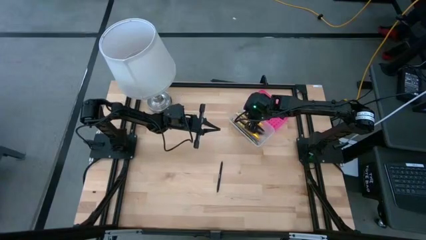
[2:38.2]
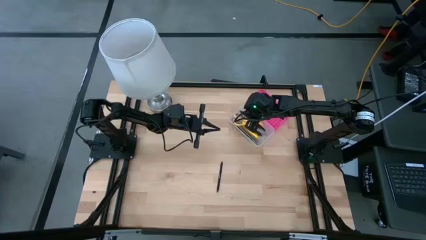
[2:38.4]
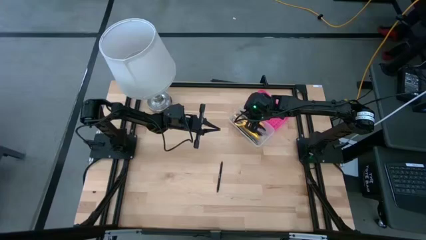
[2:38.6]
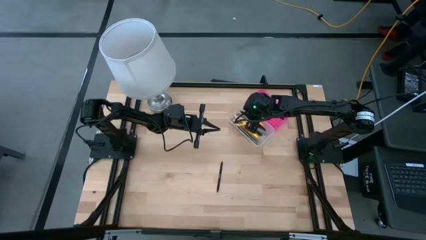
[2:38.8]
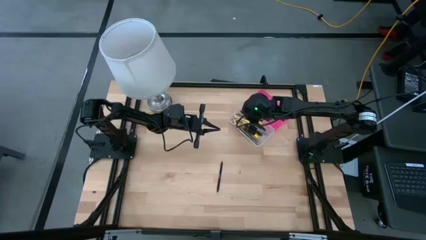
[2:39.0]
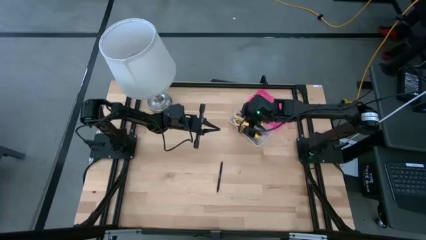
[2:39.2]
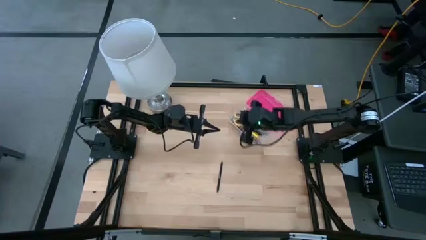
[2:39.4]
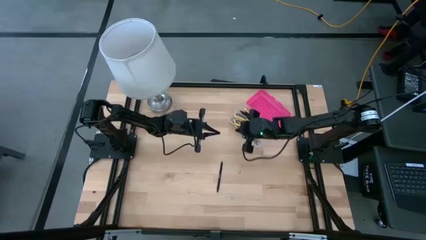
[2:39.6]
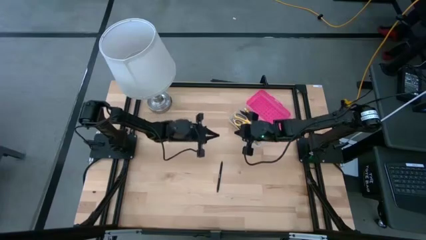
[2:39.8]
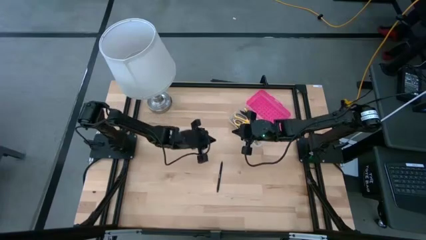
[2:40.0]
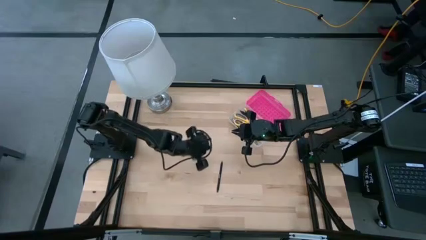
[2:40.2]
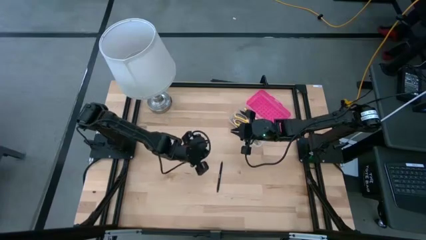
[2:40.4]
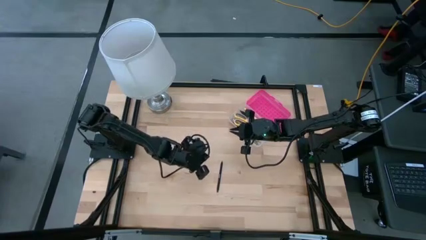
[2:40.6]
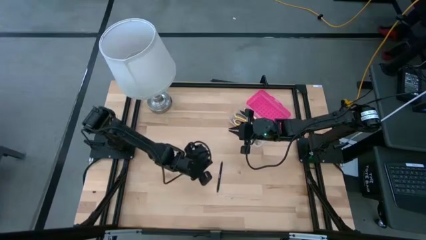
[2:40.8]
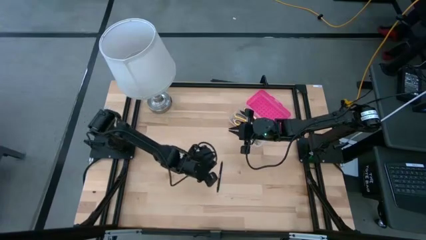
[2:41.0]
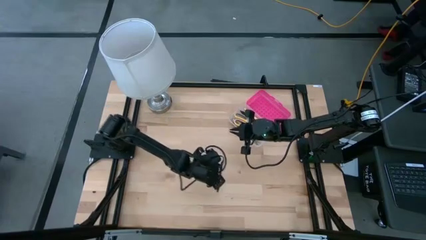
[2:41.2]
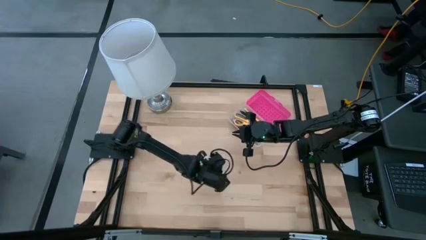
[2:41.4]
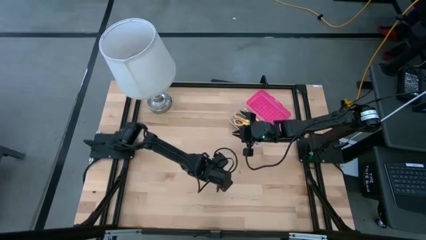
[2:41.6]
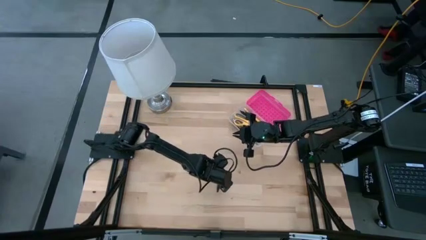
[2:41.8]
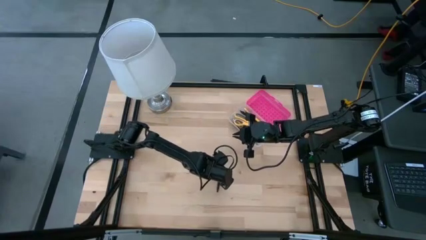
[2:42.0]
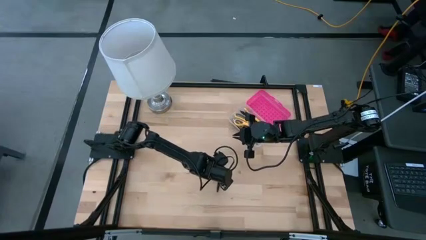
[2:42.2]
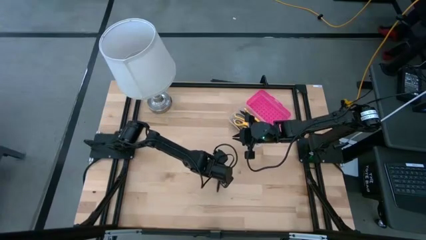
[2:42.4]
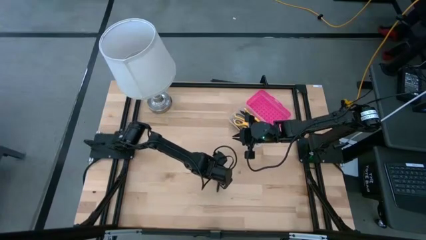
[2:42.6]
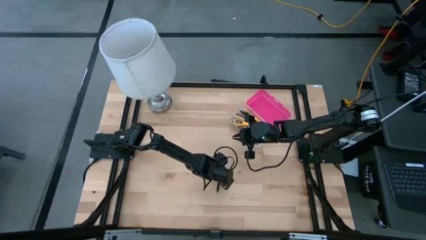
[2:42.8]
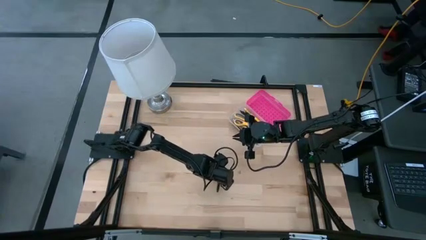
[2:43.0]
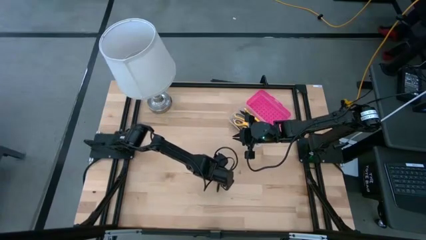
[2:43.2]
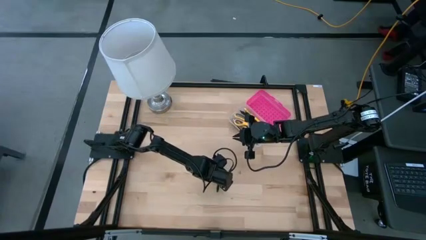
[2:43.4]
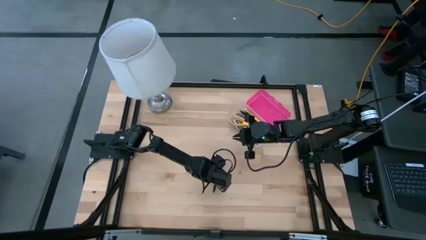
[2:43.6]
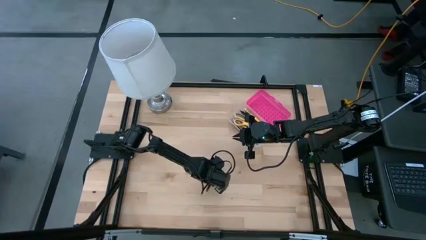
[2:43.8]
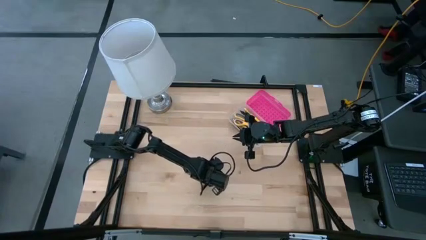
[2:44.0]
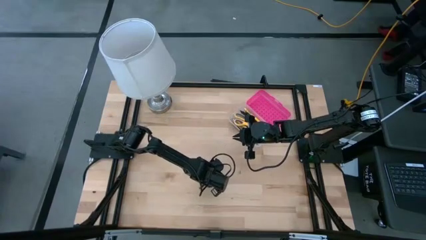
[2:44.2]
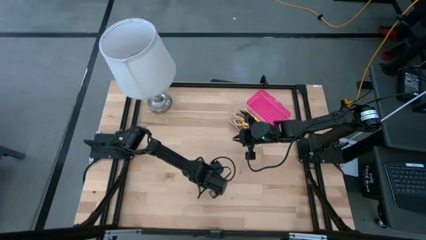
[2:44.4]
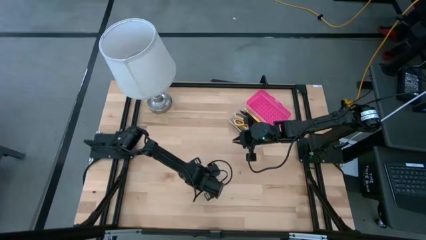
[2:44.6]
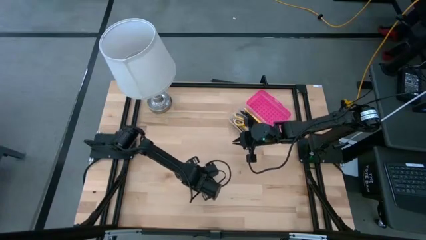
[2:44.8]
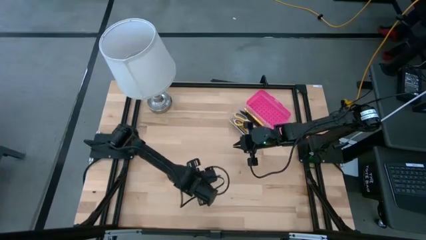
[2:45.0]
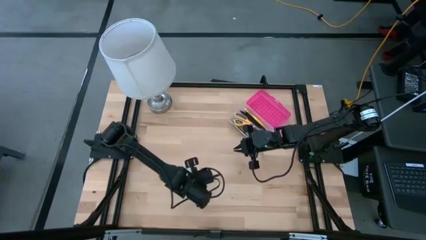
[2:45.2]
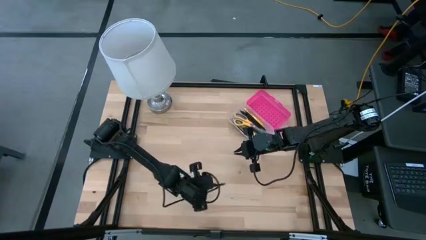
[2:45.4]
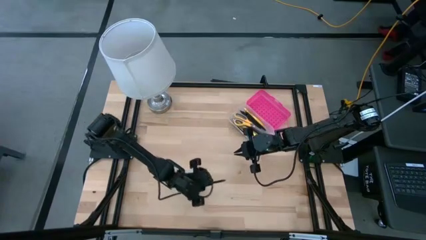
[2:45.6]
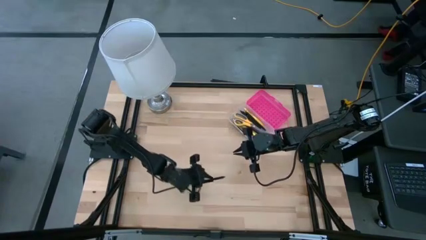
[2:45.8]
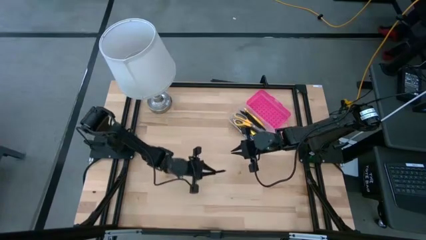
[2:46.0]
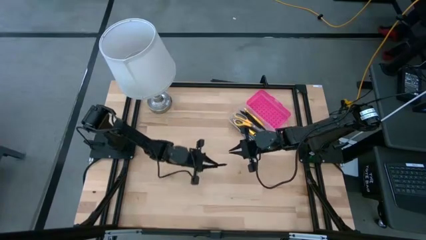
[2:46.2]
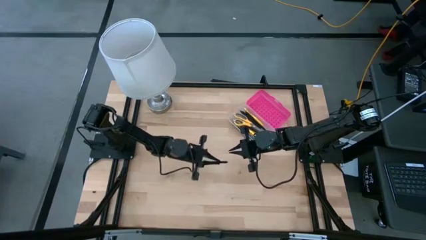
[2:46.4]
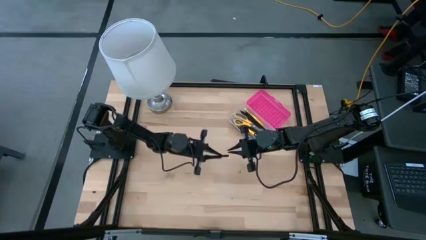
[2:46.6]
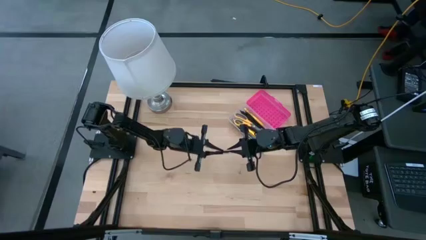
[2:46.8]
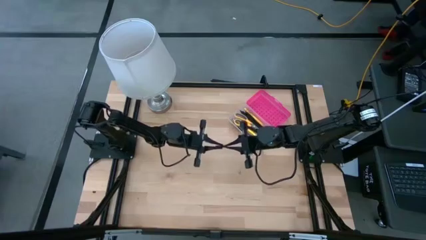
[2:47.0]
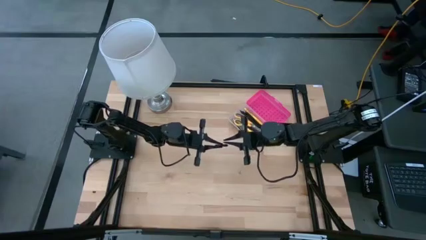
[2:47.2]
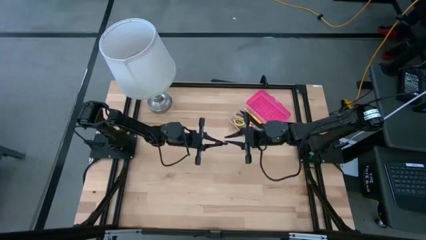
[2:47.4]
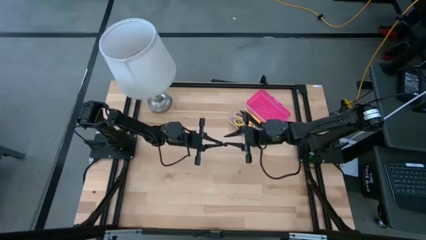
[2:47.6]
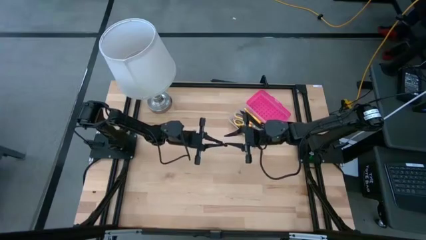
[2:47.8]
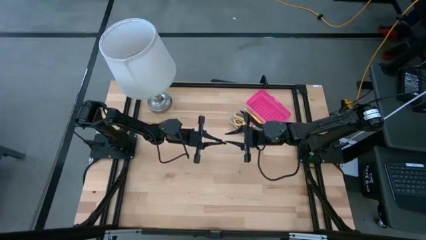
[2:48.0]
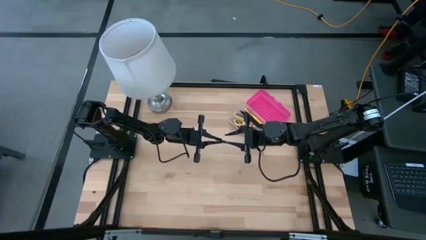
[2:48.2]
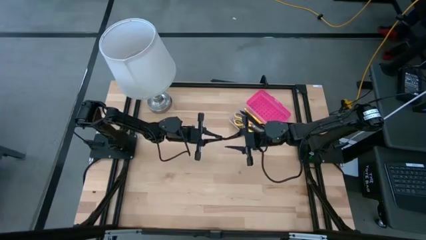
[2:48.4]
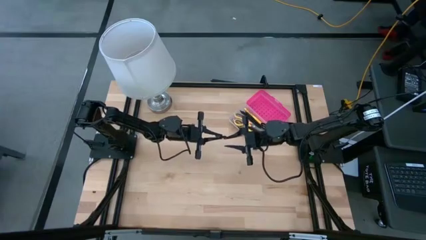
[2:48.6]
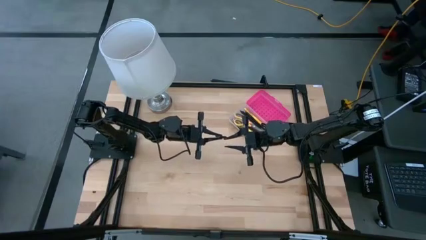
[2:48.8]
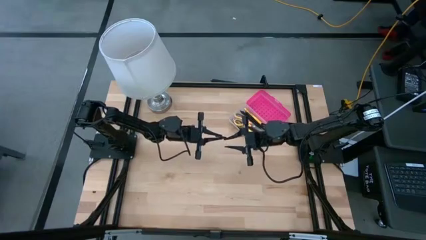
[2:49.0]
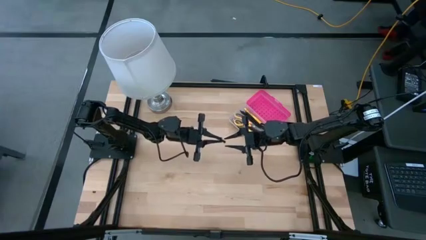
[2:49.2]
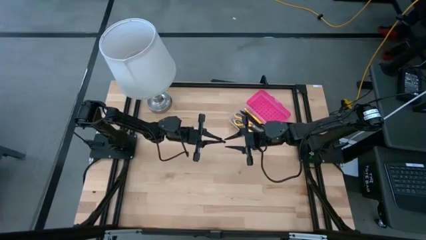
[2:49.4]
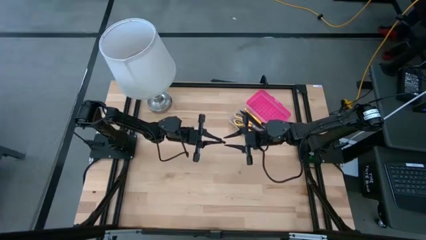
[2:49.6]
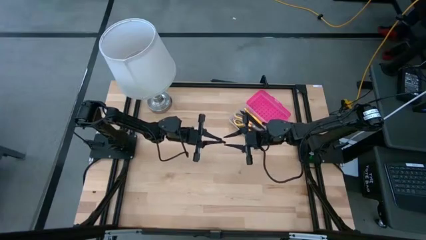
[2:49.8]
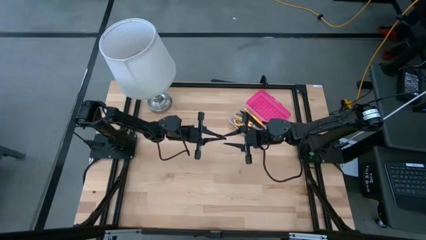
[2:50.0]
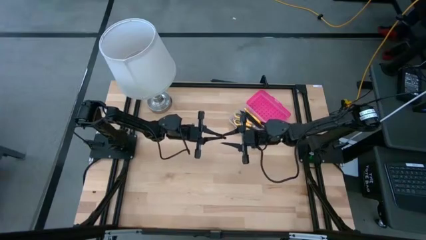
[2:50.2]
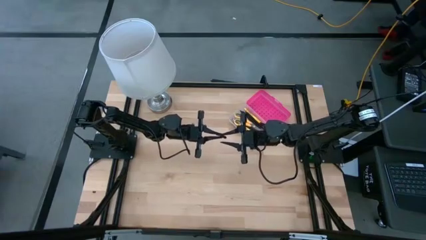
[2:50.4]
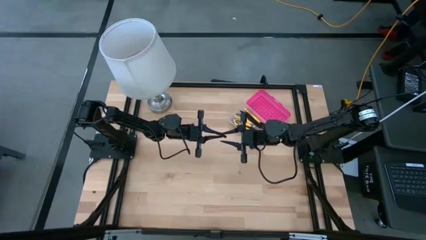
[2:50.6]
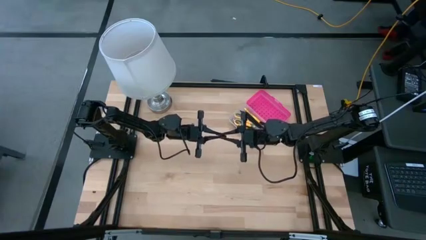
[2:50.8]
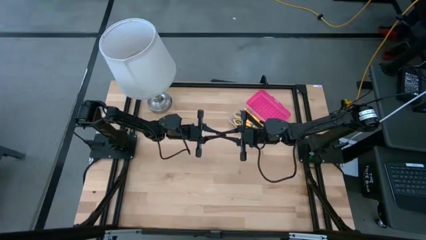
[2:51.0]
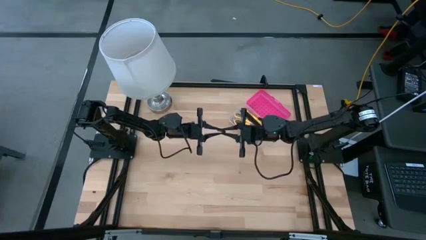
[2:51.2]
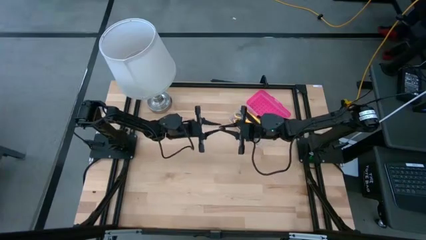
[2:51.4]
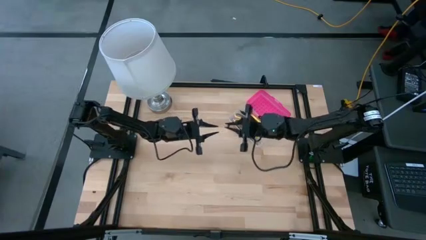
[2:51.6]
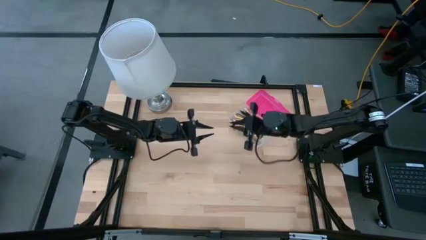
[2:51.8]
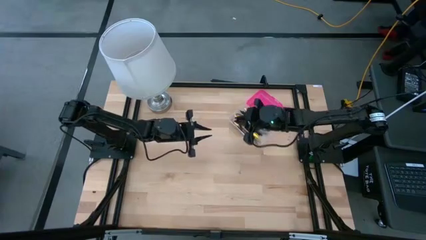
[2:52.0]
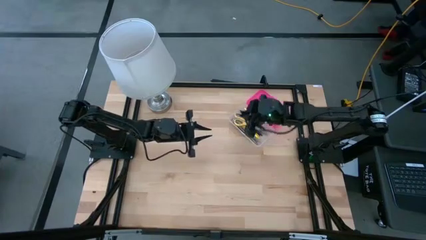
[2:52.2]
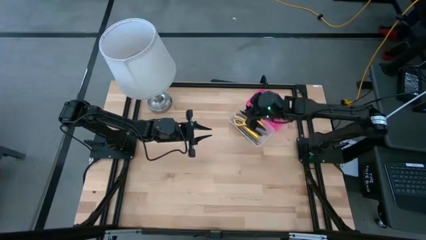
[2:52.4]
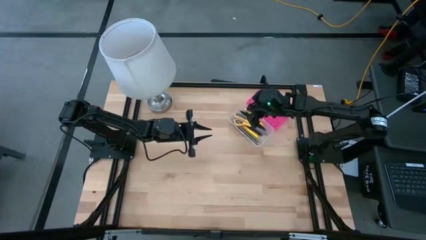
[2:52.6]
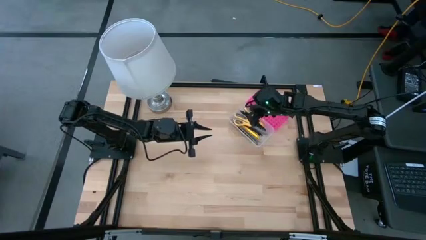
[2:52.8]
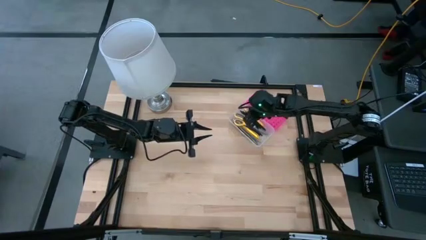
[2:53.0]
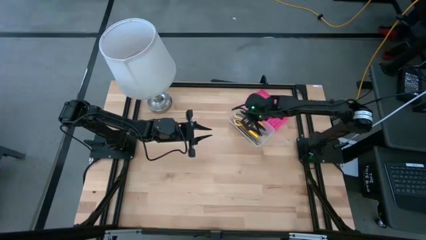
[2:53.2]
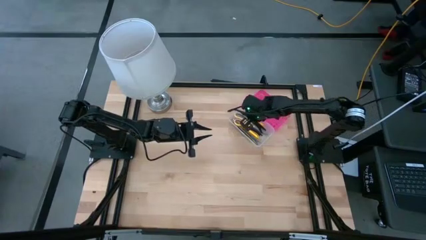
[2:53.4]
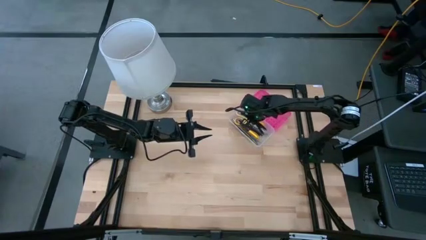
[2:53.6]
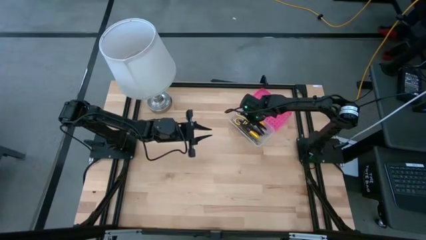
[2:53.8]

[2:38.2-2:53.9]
Task: Pick & place school supplies into a supply box
Put the black pen into the pink supply box
